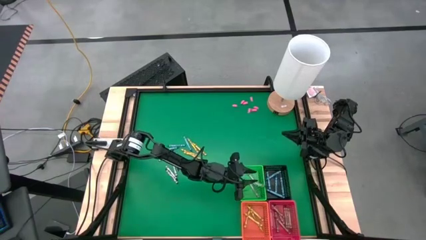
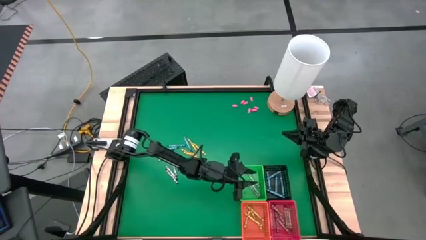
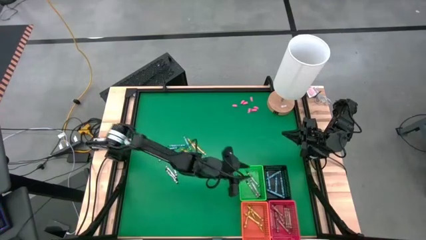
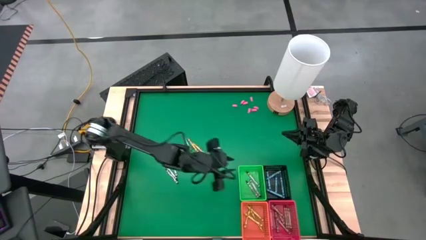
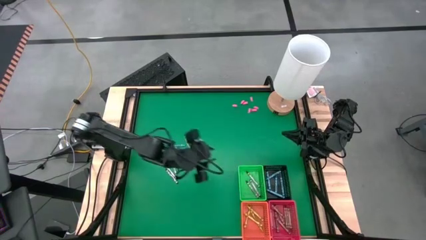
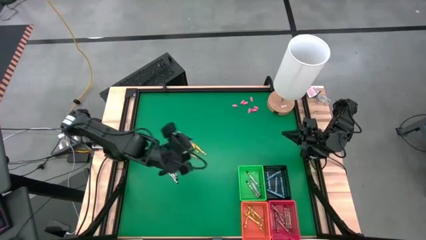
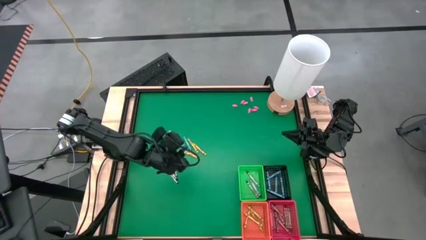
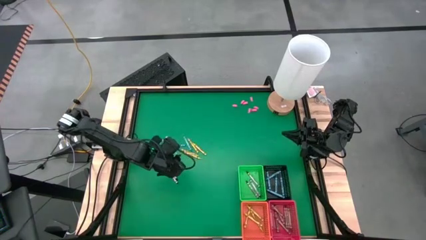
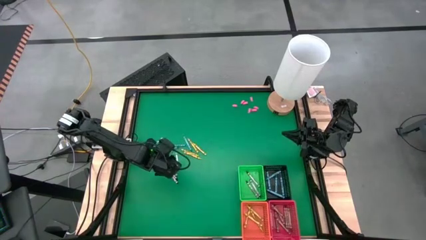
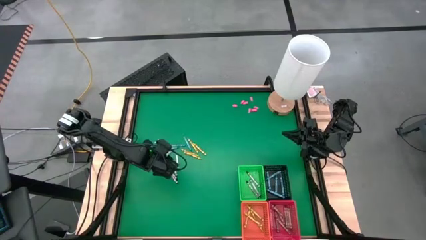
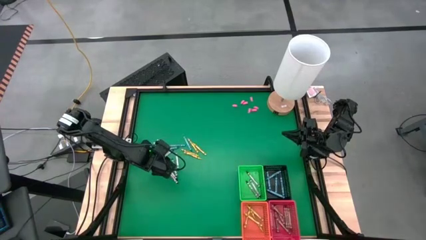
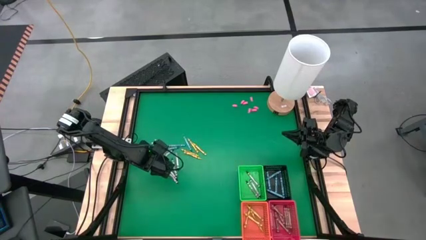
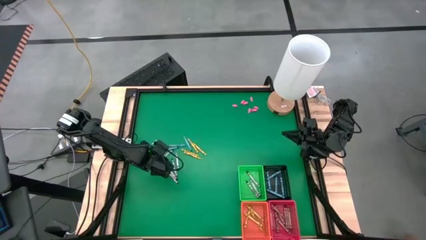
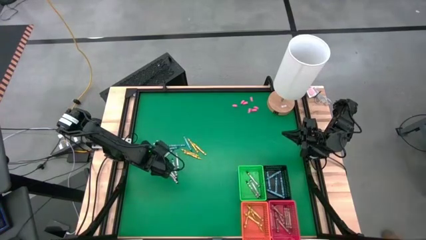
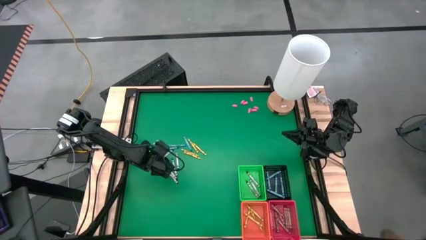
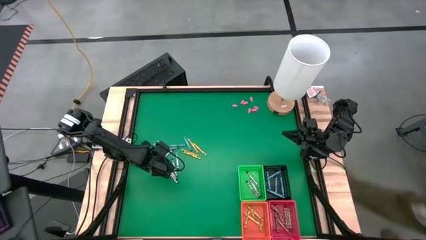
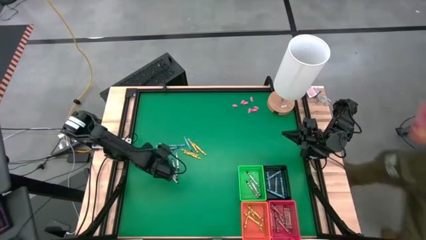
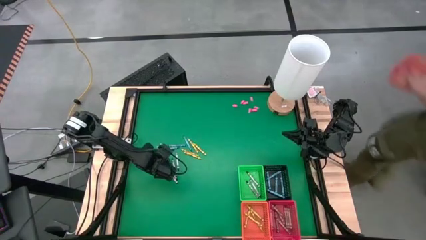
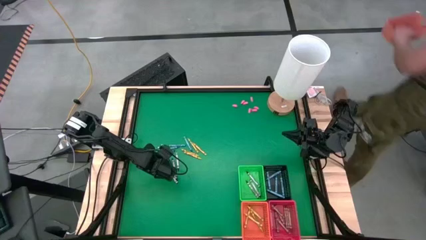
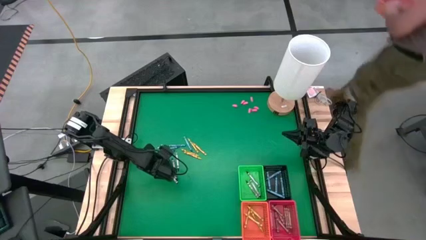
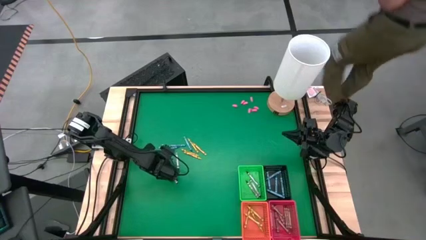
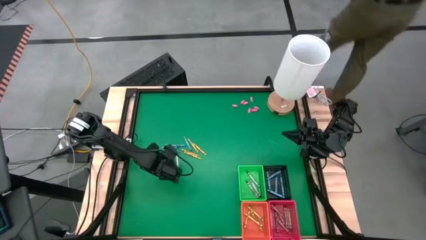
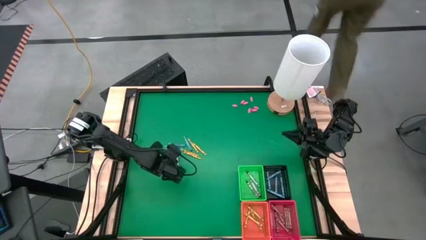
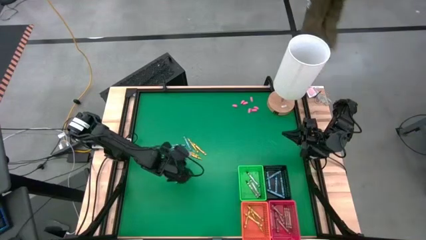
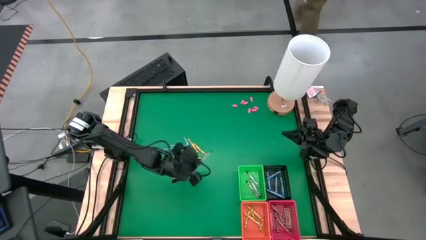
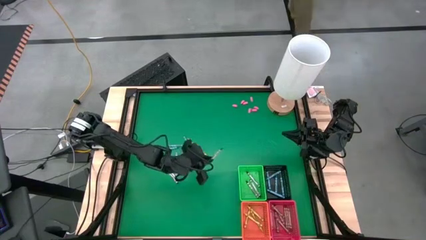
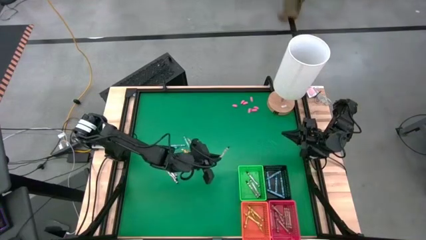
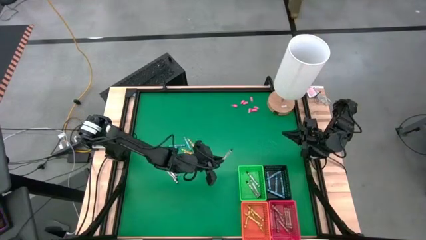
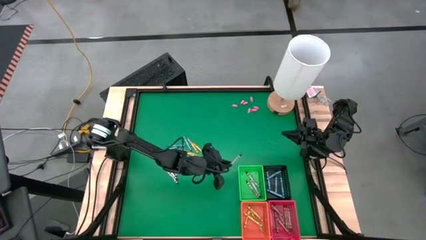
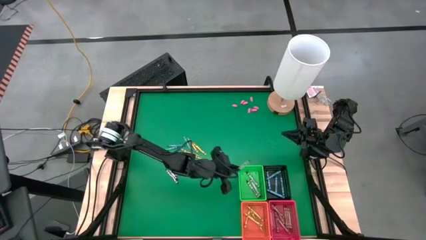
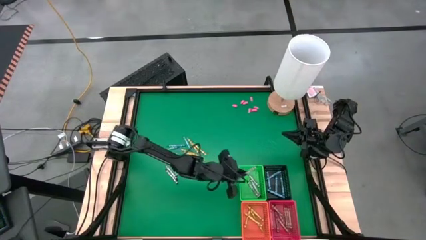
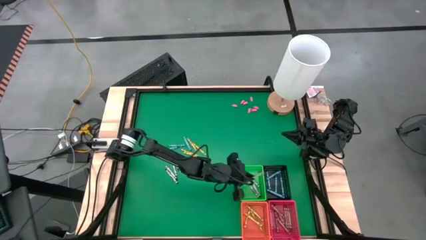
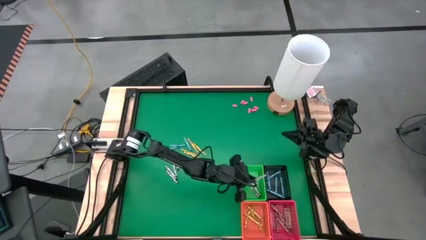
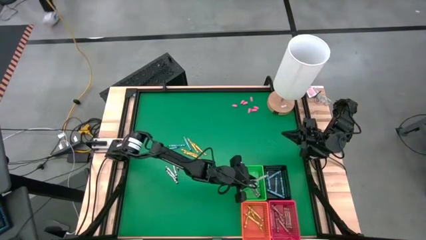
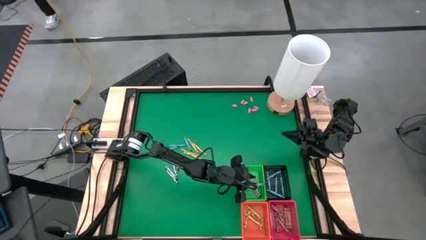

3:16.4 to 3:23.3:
Task: Sort crayons
Put the black crayon into the green bin

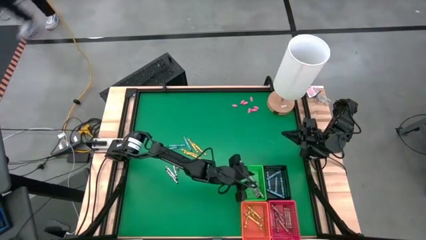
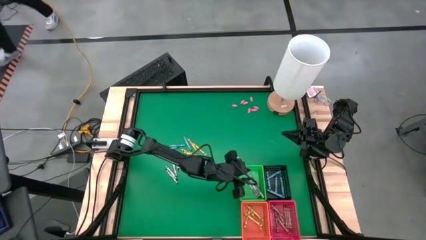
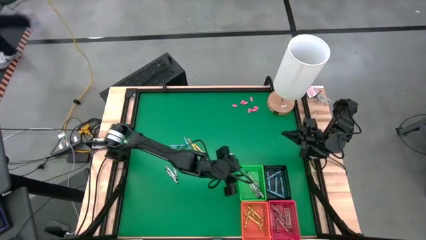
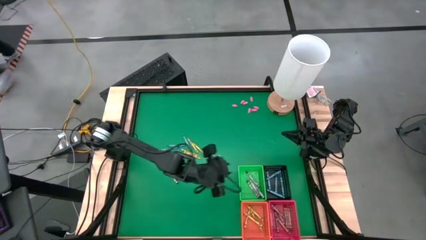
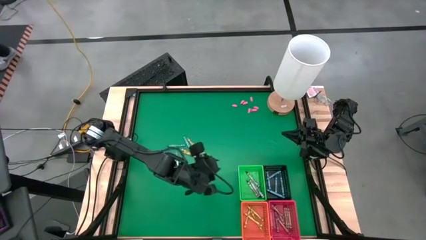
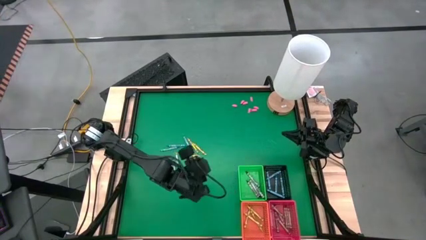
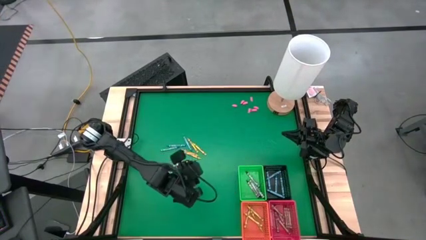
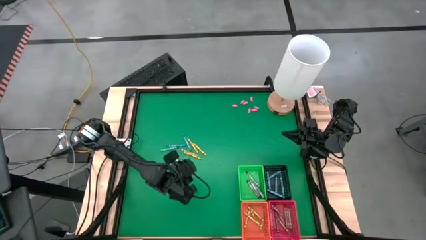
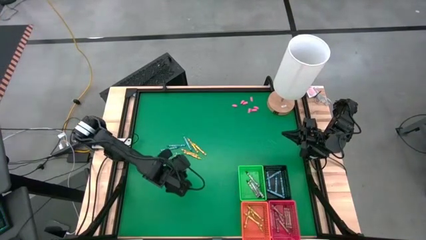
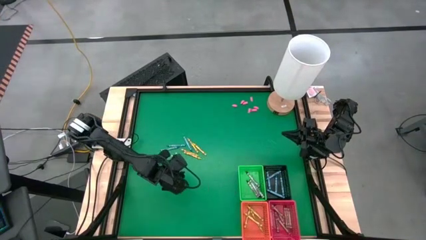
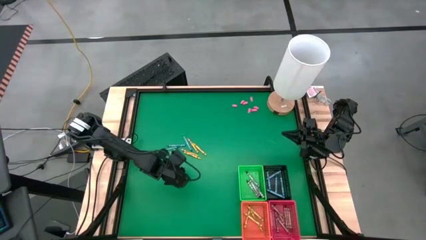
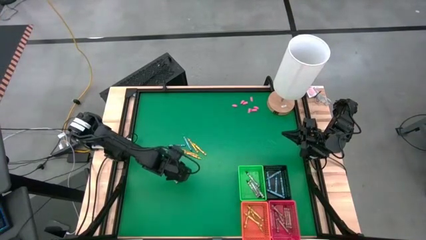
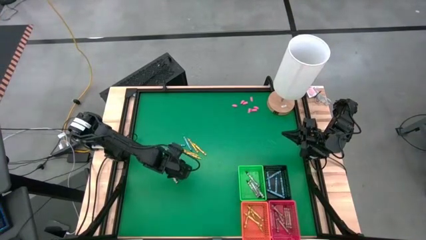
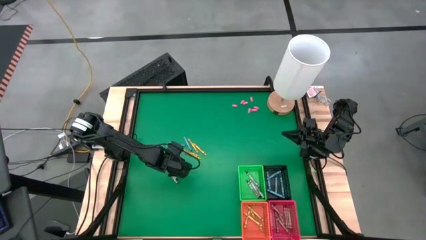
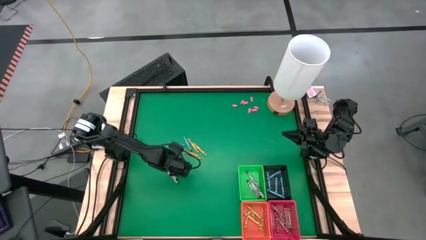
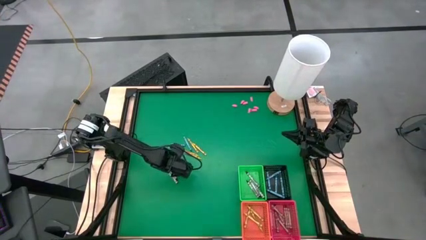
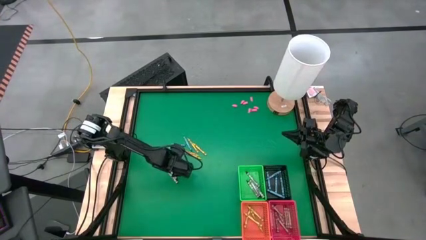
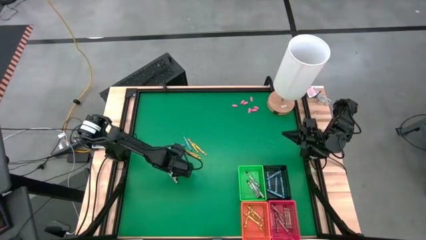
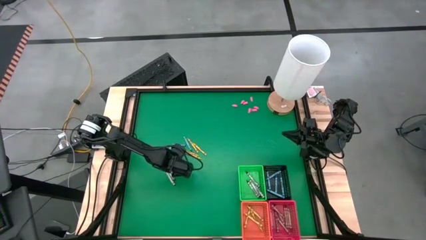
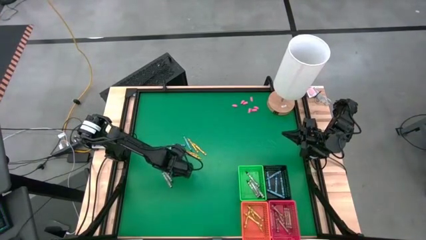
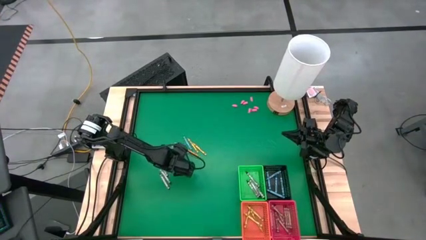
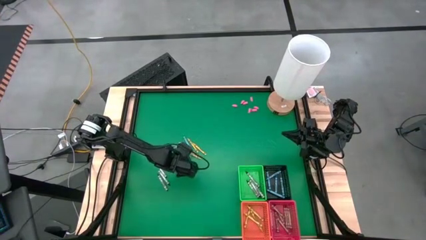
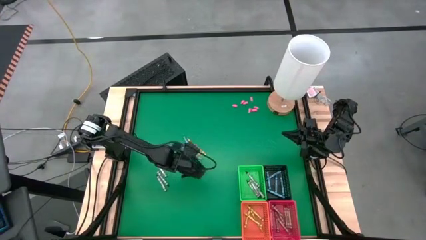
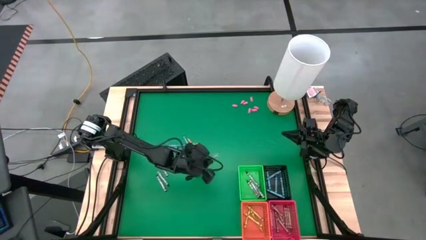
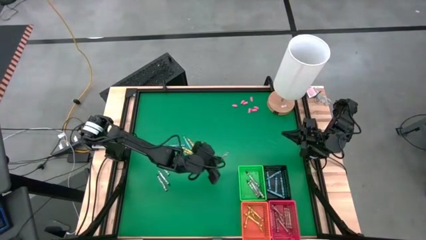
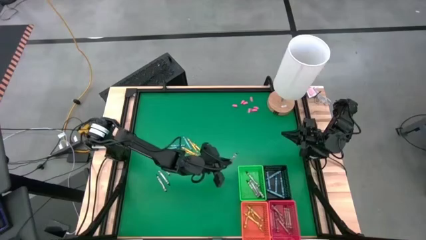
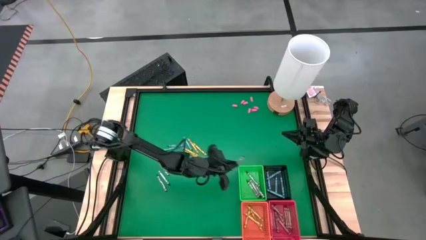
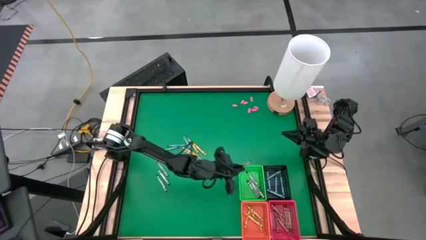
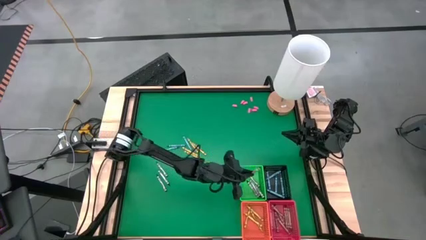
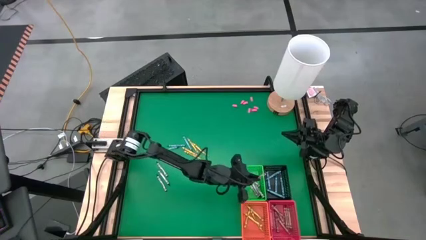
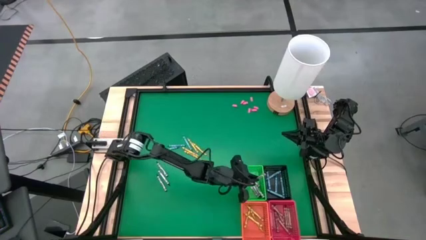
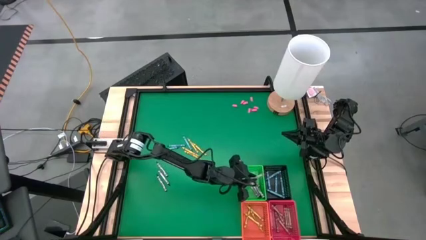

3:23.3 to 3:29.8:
Put the black crayon into the green bin

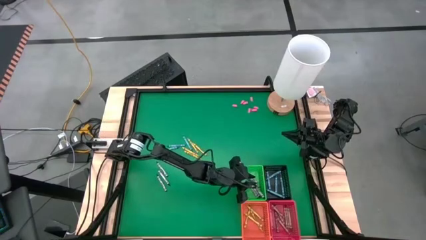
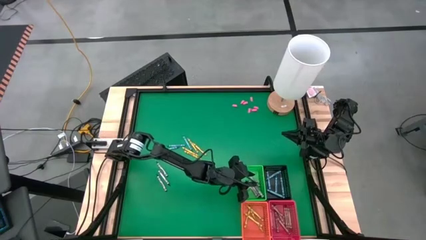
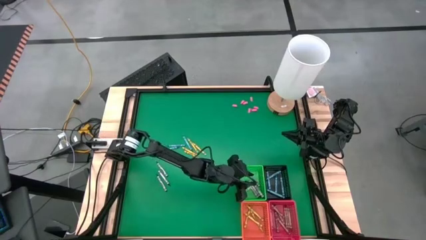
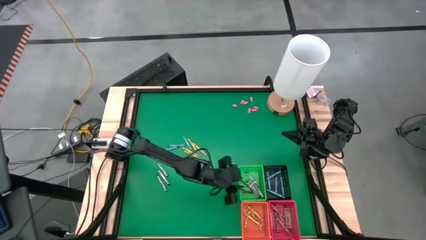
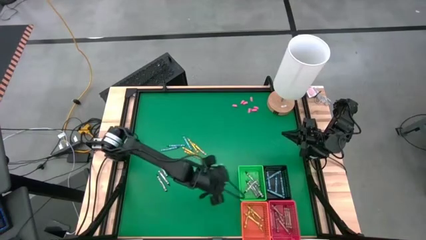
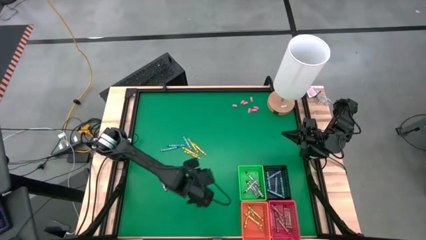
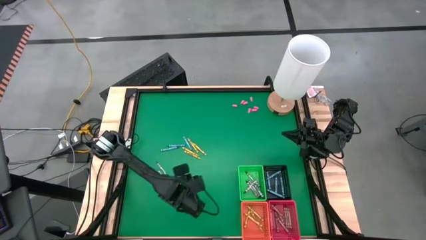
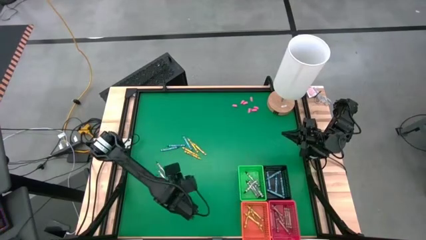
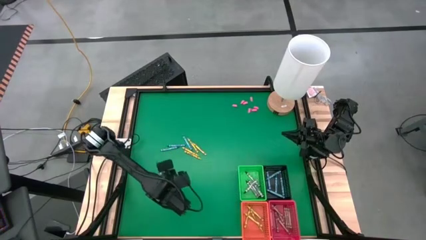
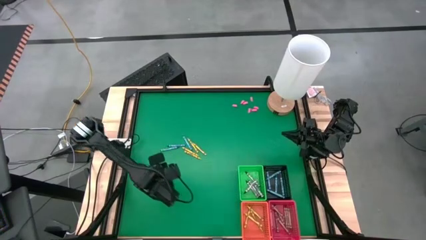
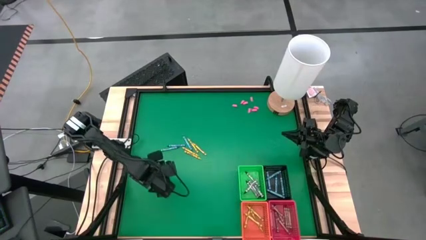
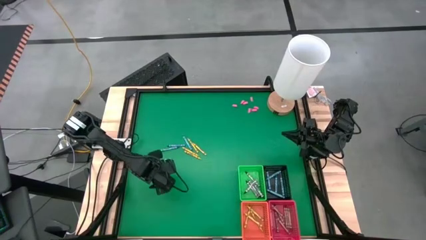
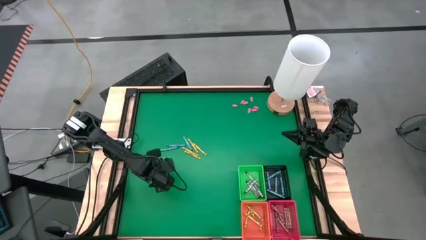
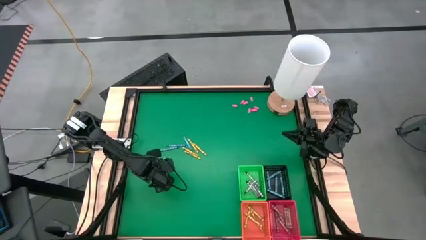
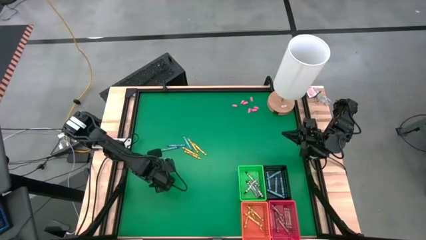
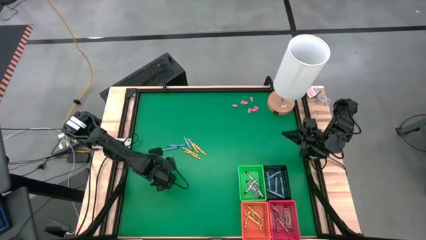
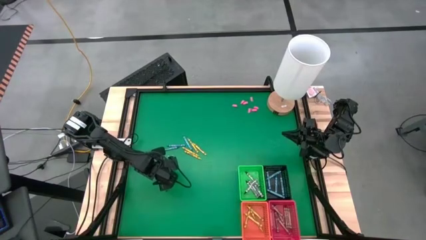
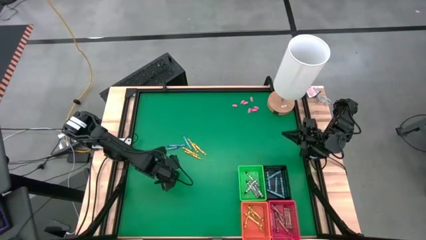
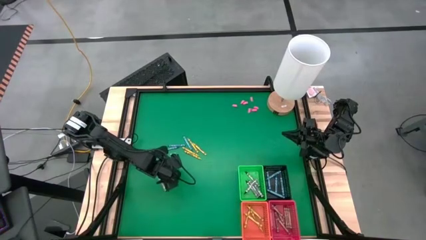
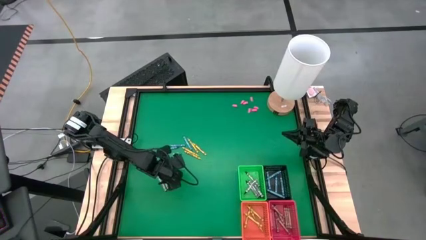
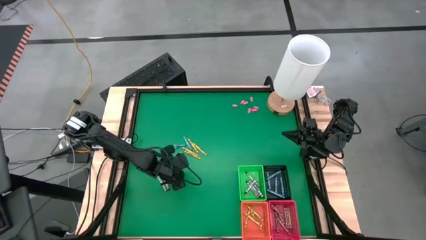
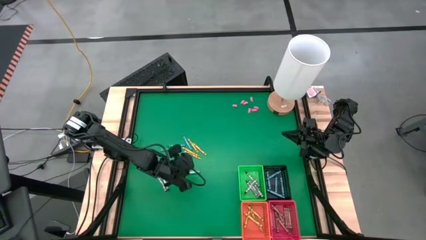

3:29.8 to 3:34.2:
Put the black crayon into the green bin
